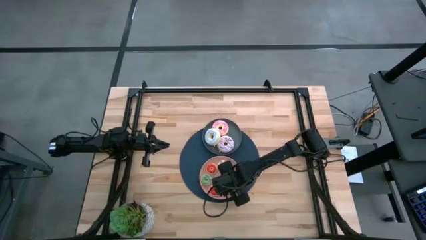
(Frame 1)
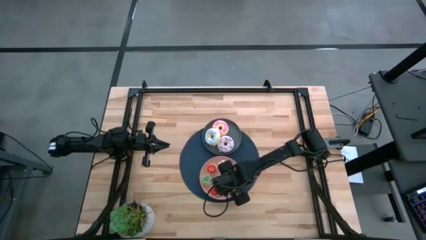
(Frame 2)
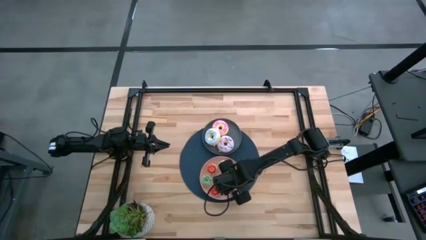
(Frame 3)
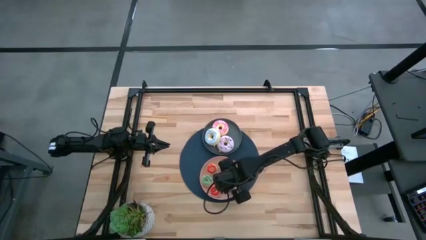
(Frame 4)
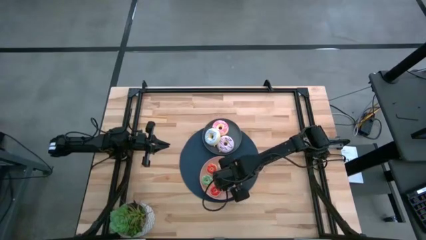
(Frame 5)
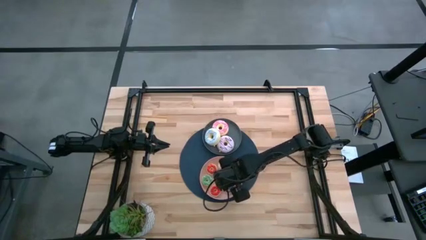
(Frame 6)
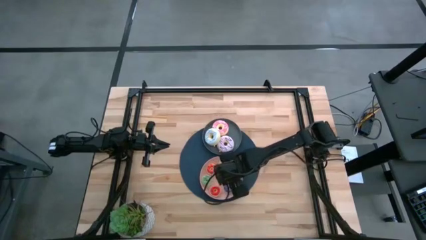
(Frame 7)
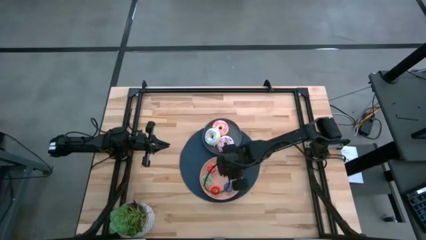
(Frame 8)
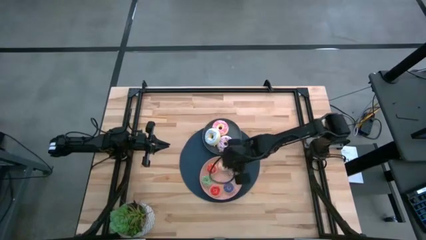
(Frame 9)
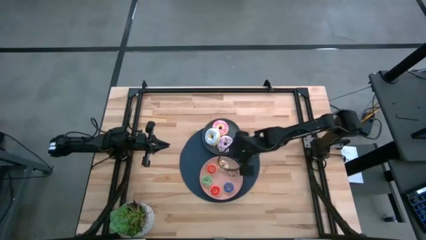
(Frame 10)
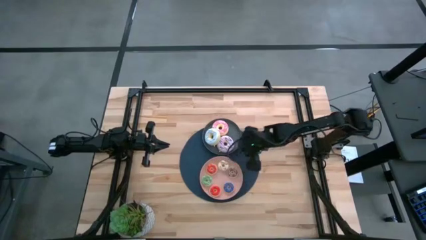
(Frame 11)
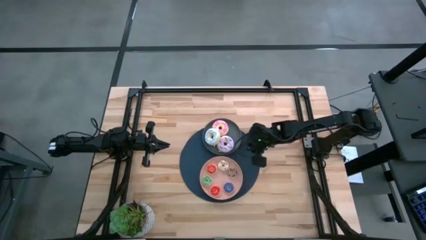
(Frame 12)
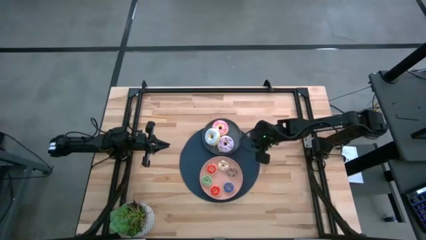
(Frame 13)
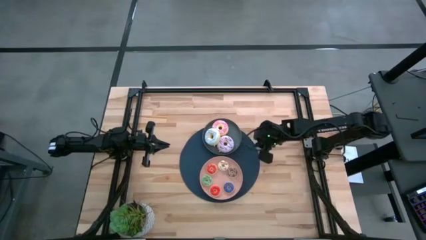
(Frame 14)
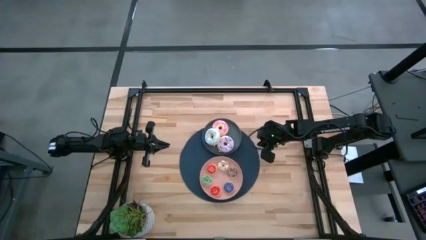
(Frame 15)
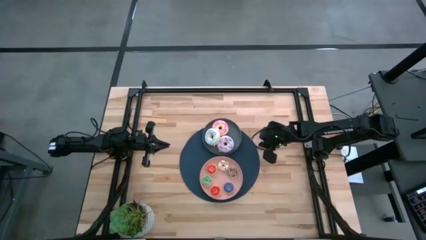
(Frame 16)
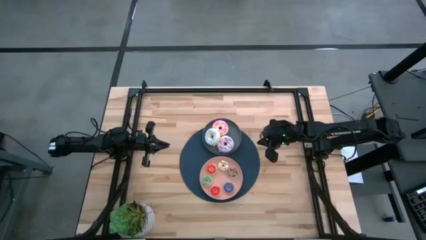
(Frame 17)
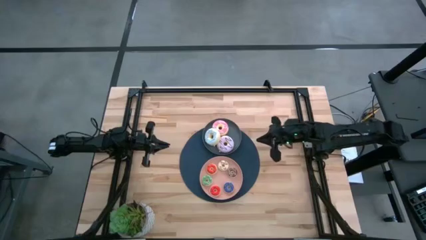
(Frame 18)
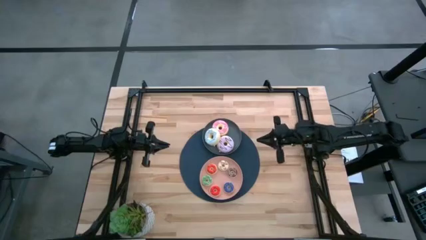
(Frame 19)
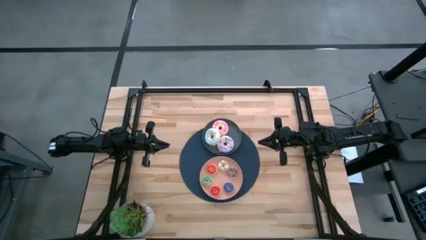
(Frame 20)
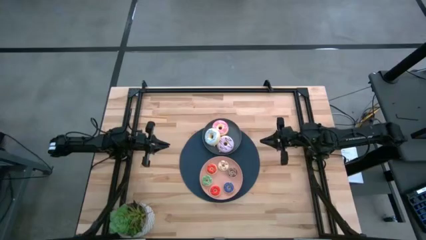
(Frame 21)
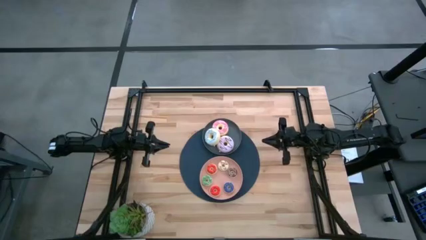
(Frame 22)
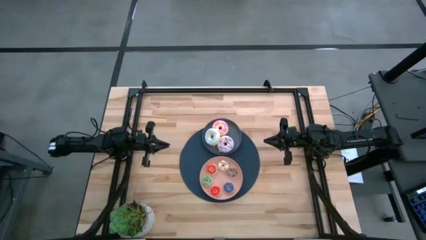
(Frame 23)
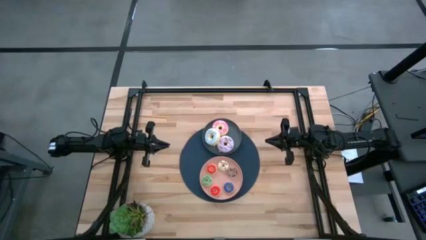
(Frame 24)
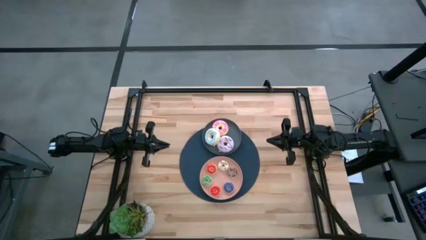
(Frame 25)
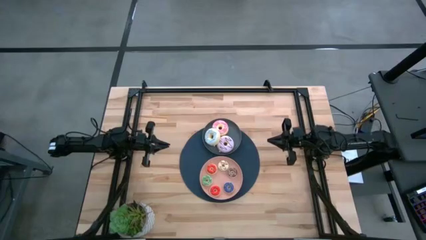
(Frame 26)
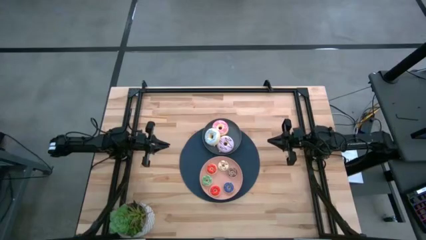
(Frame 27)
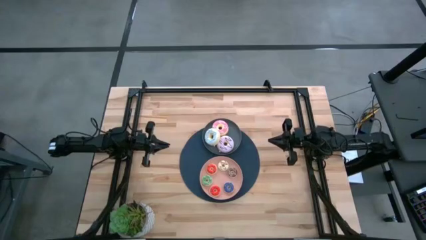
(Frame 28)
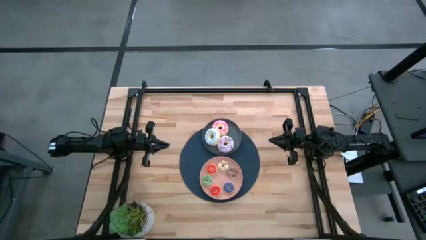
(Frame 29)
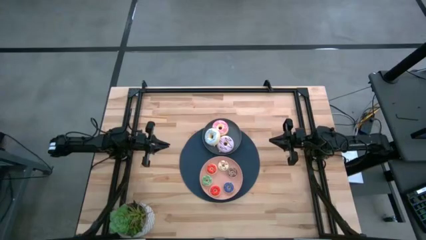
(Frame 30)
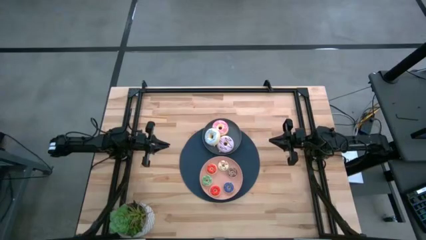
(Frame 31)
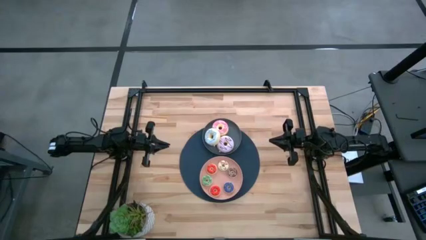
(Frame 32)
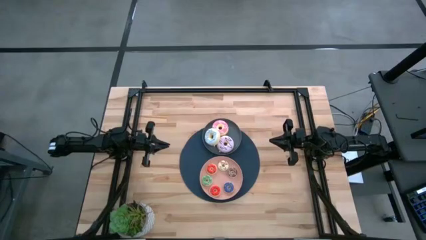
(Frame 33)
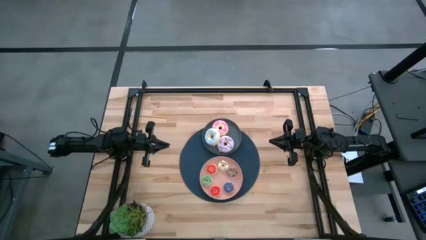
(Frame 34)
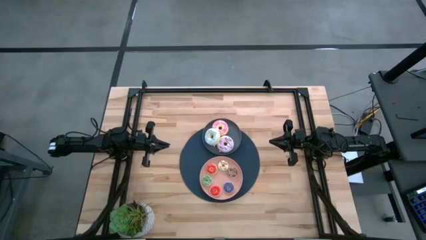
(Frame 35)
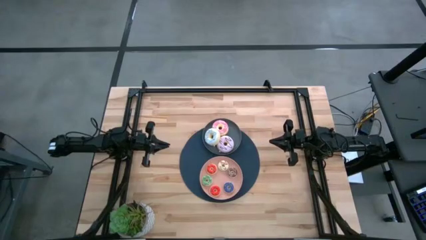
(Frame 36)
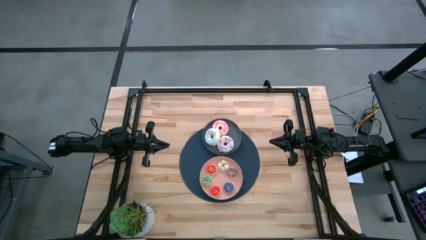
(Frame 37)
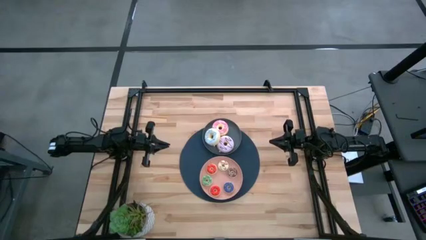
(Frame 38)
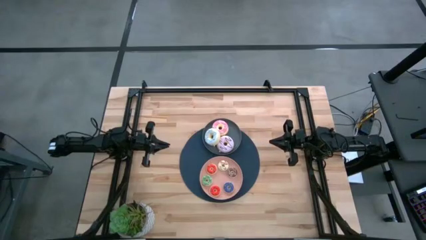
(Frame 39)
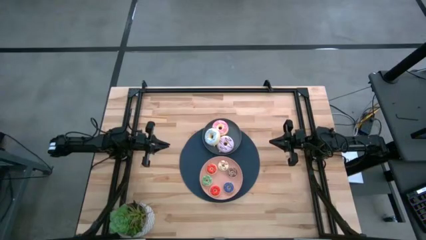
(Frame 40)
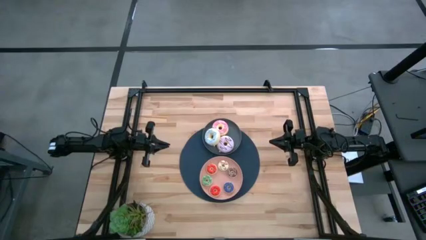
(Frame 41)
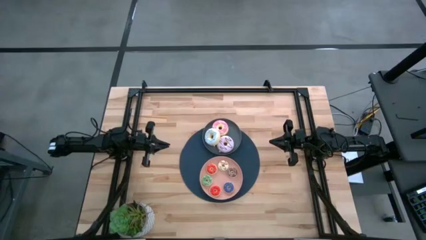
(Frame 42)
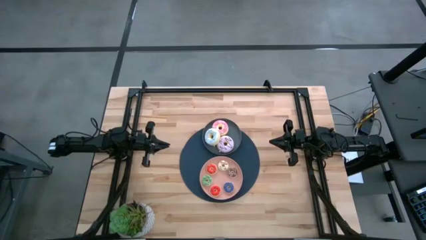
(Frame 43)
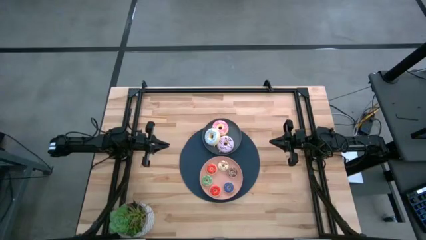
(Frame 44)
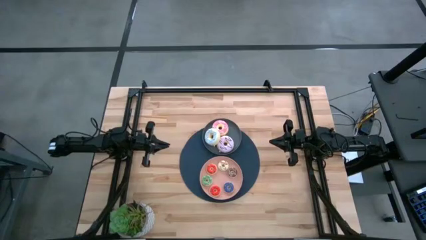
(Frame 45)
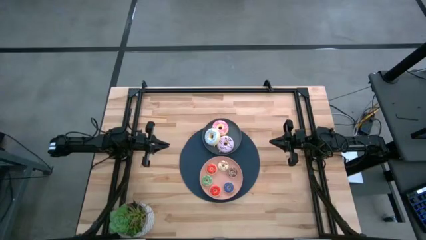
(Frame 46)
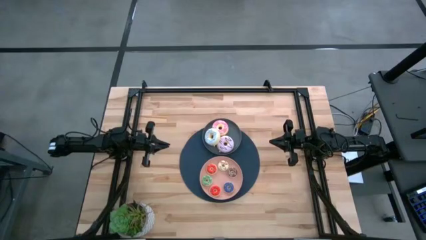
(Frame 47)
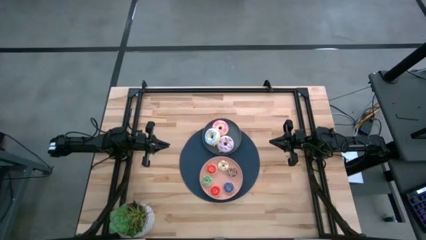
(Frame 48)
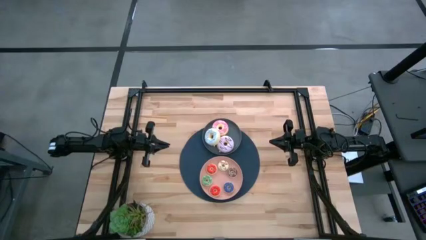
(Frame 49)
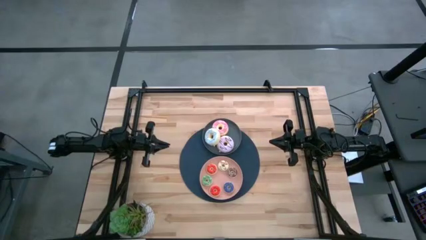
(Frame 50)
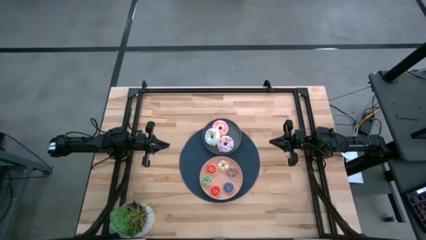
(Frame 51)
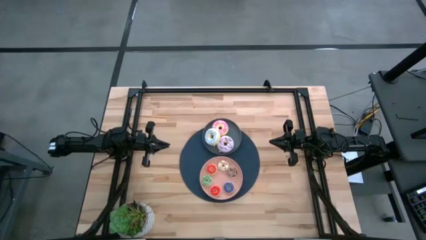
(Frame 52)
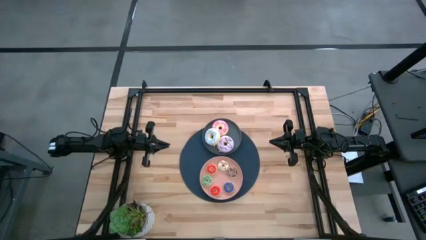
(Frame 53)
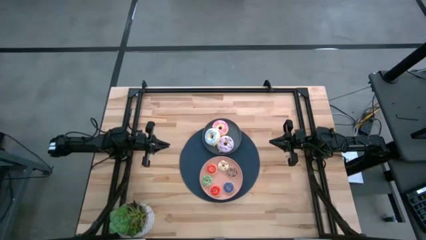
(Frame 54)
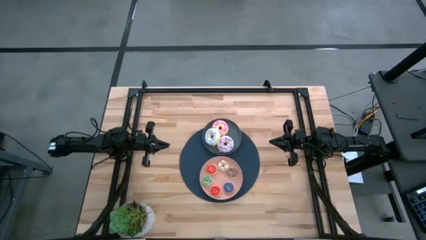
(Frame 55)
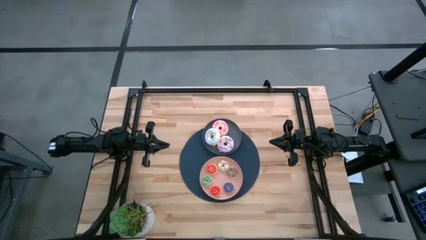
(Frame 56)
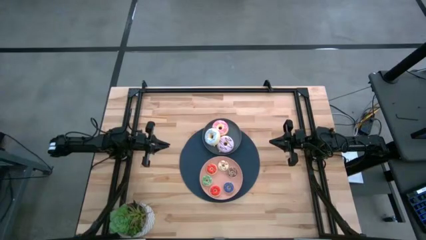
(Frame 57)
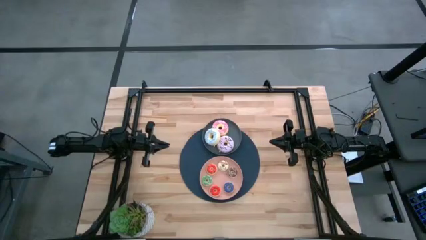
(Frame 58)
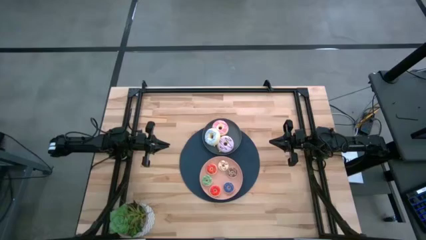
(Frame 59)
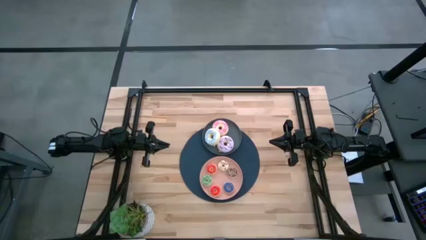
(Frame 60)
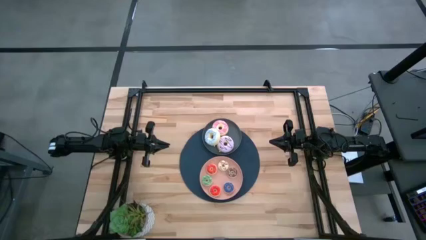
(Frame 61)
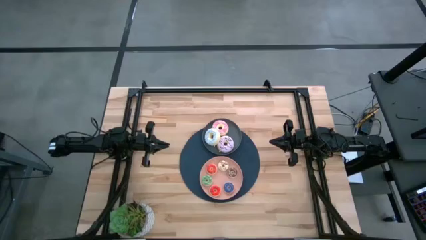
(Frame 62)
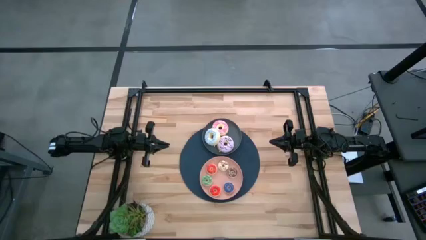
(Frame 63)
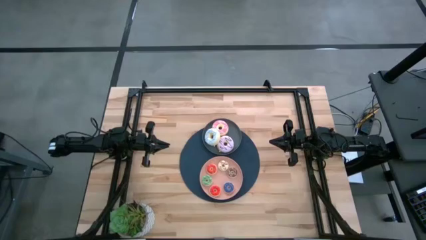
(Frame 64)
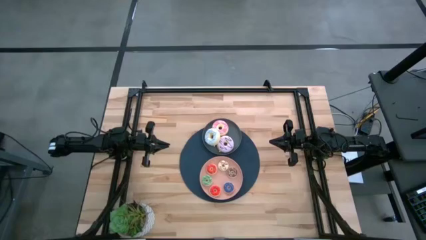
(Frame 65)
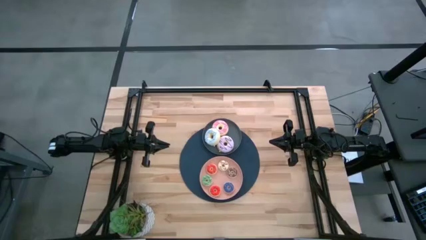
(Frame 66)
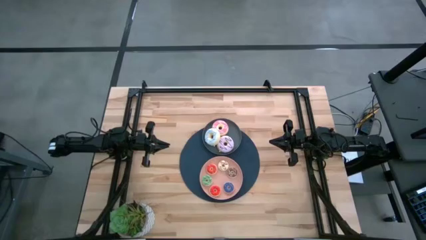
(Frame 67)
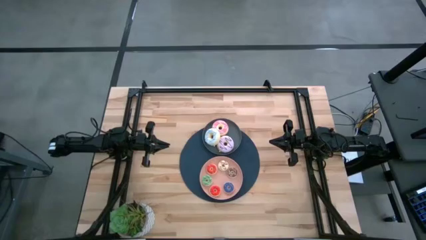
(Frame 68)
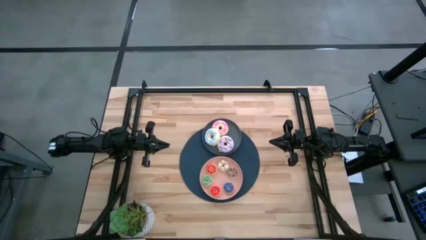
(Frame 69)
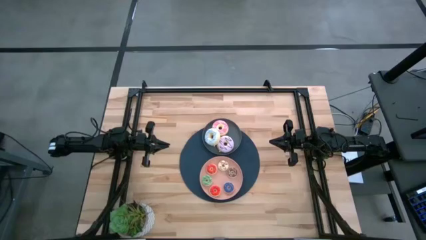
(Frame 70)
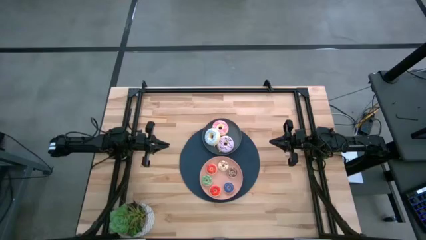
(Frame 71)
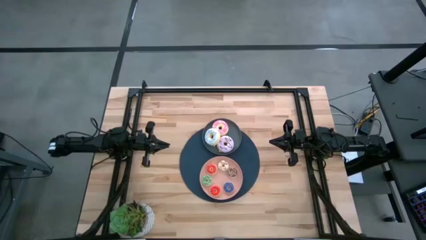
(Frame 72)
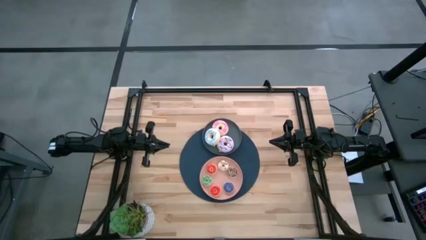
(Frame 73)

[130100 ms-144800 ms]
Task: Pick & Place donuts
Return to Home Position

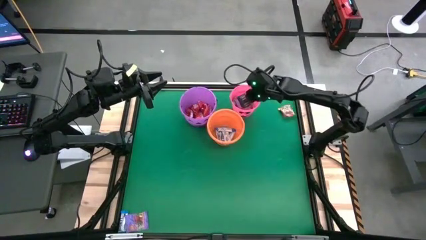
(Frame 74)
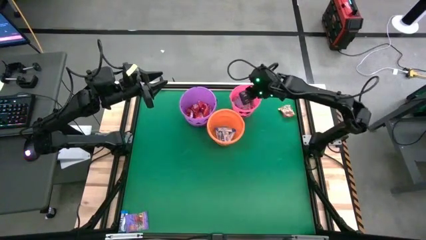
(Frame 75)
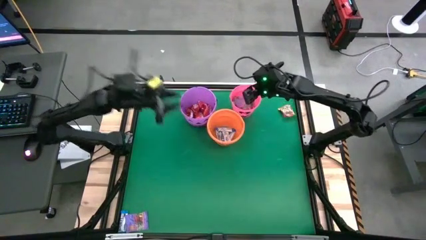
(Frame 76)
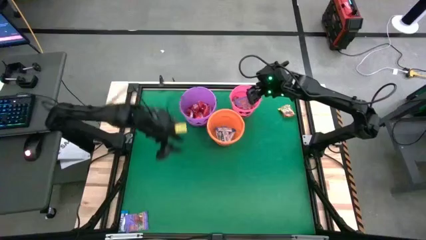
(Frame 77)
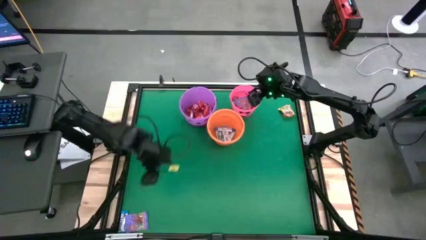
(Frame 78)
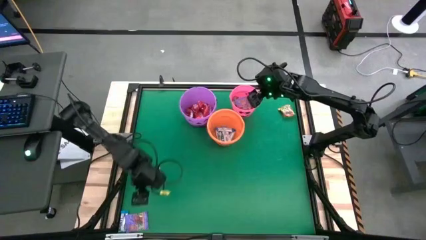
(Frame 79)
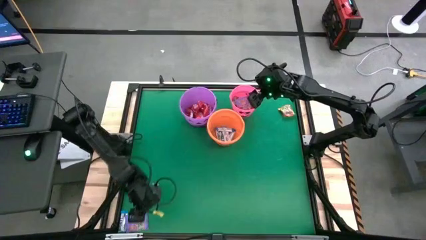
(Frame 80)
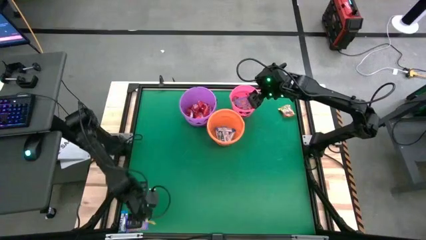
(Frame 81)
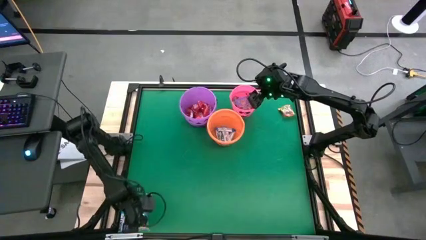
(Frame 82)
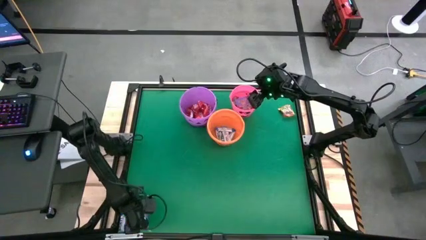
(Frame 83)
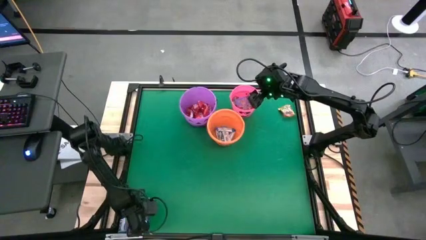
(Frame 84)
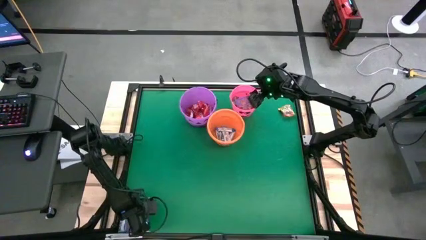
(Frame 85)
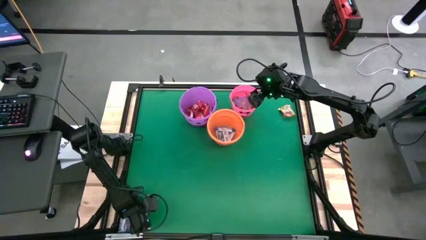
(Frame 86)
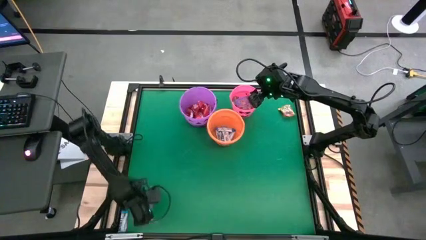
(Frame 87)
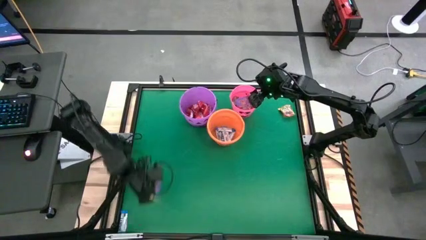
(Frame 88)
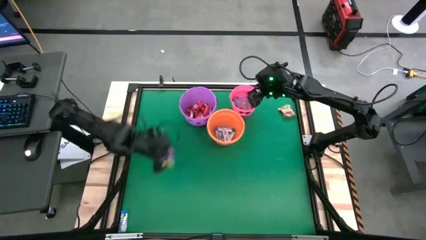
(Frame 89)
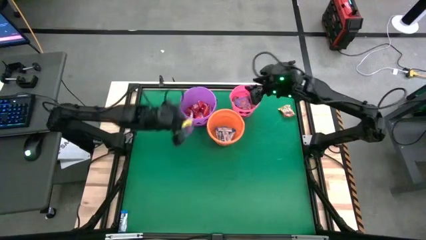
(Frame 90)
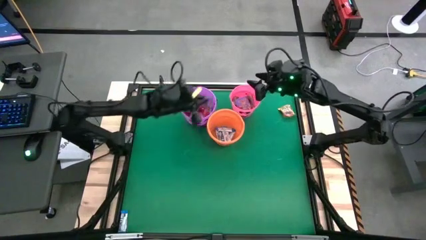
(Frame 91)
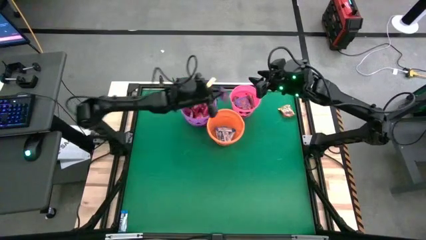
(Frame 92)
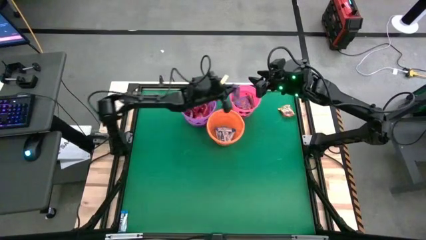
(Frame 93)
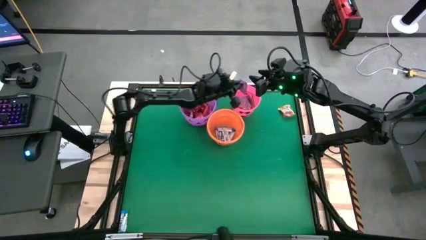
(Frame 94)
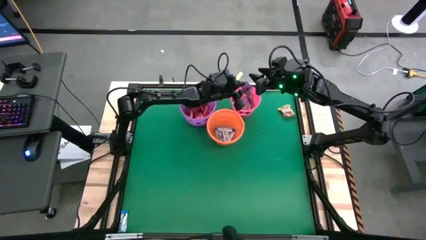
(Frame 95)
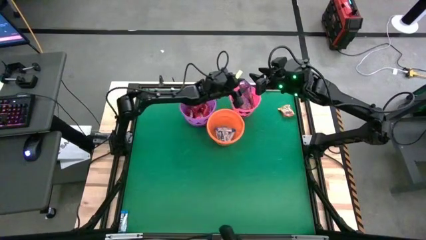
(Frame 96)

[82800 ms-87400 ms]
Task: Sort candy by brand, put in halloween buckets
Put the violet gummy candy into the pink bucket
